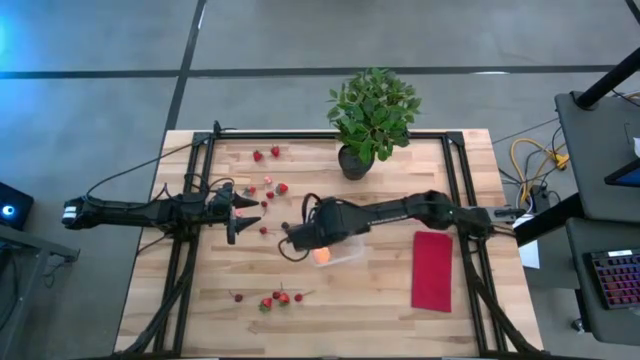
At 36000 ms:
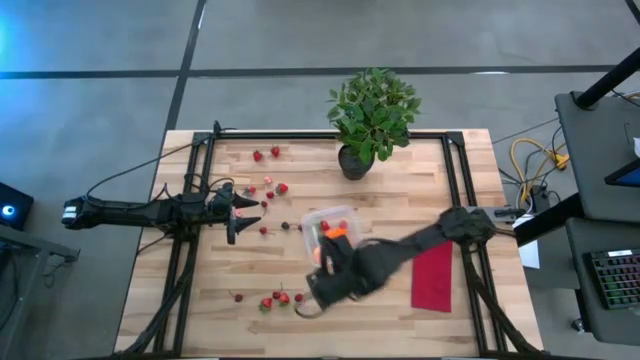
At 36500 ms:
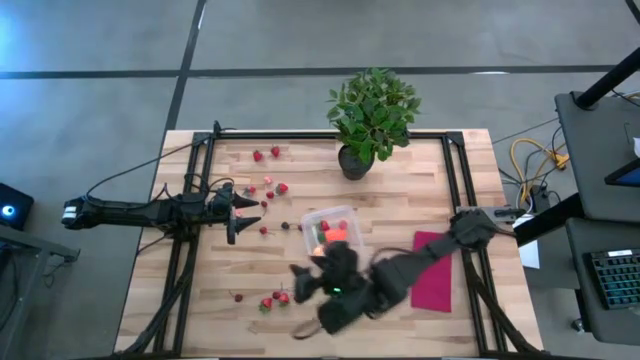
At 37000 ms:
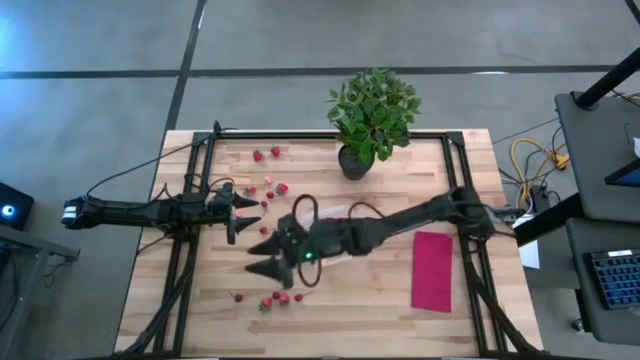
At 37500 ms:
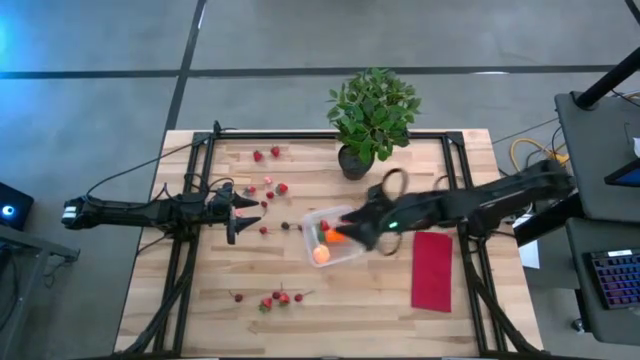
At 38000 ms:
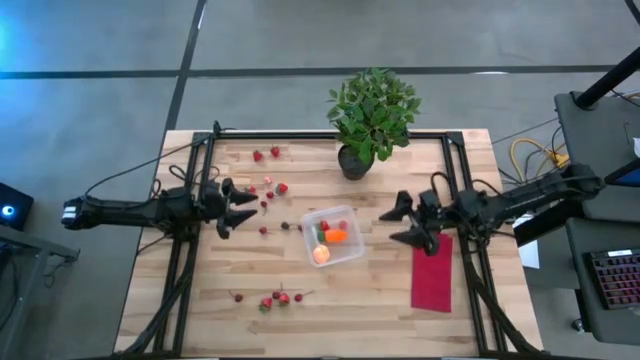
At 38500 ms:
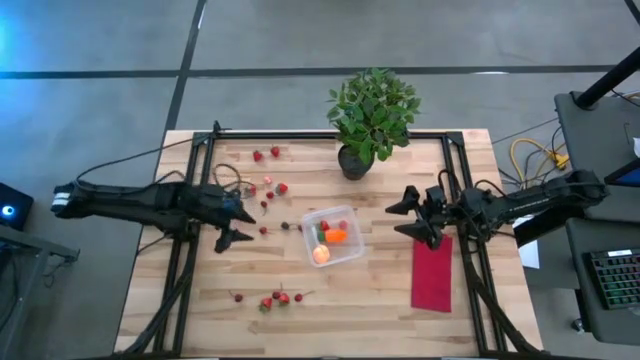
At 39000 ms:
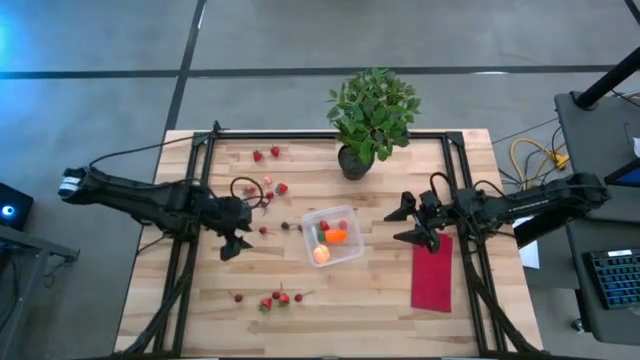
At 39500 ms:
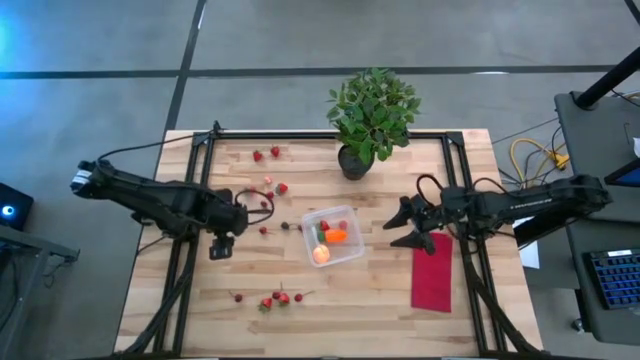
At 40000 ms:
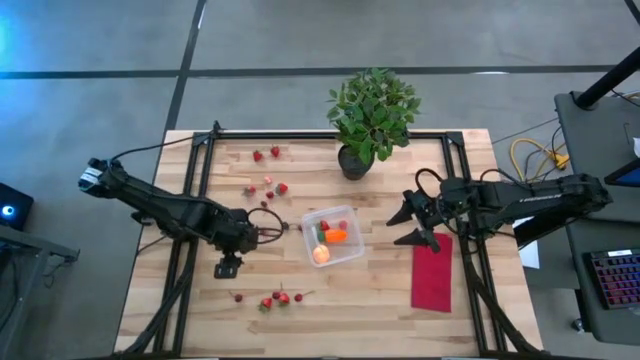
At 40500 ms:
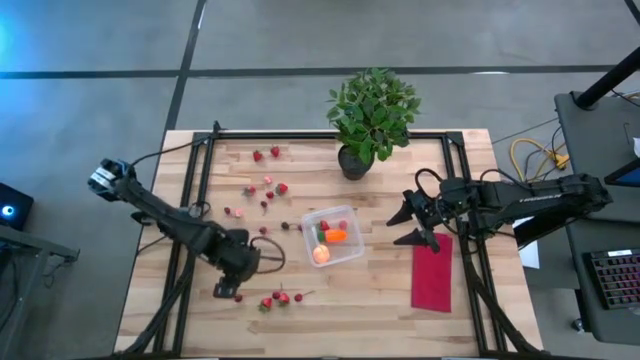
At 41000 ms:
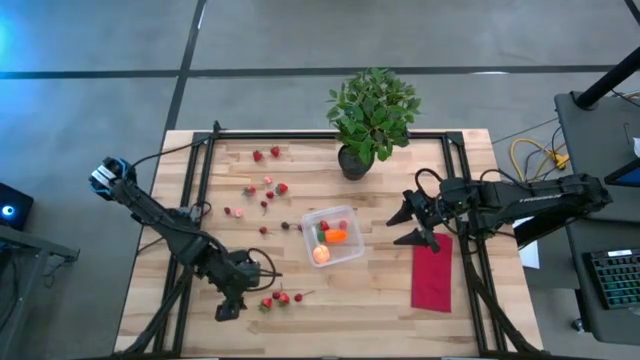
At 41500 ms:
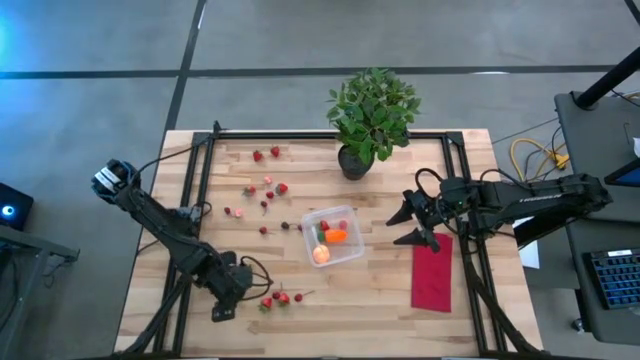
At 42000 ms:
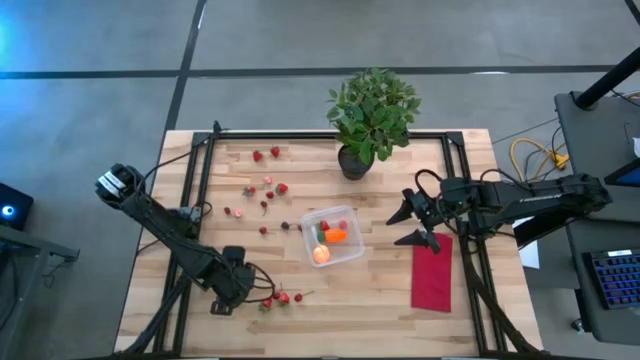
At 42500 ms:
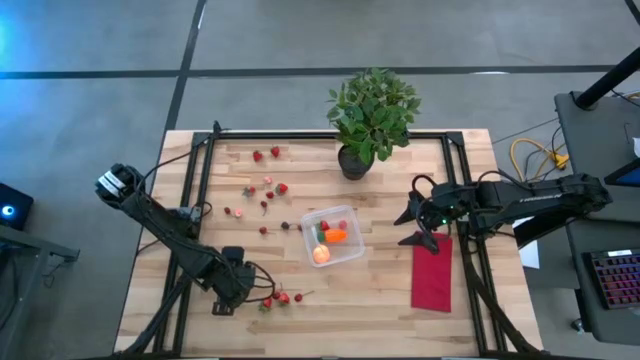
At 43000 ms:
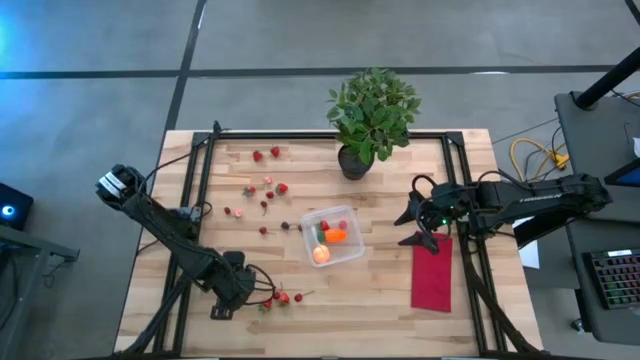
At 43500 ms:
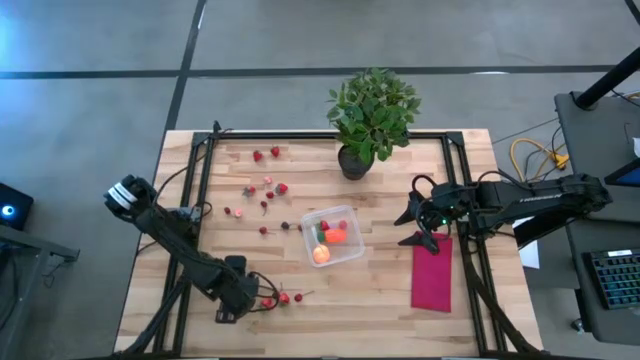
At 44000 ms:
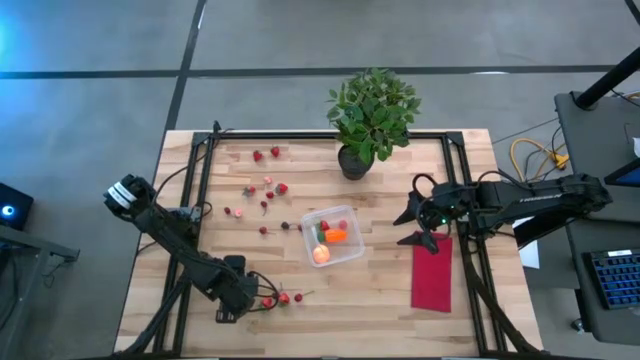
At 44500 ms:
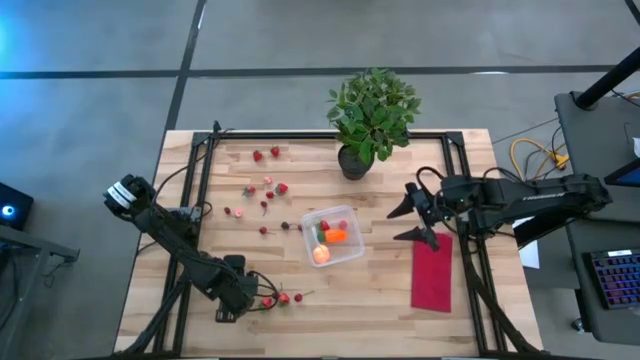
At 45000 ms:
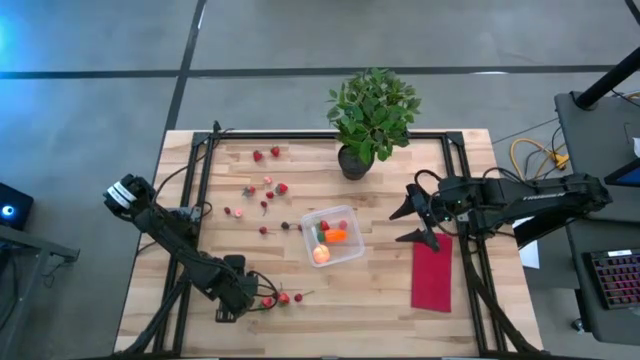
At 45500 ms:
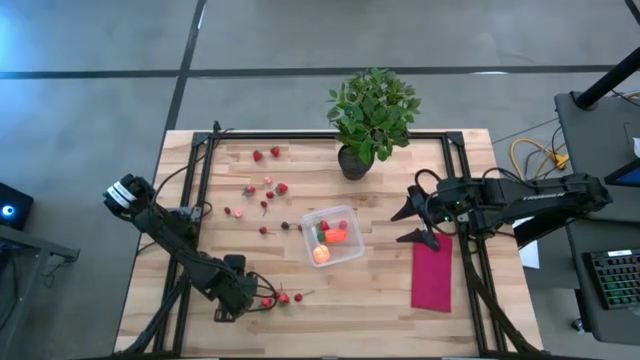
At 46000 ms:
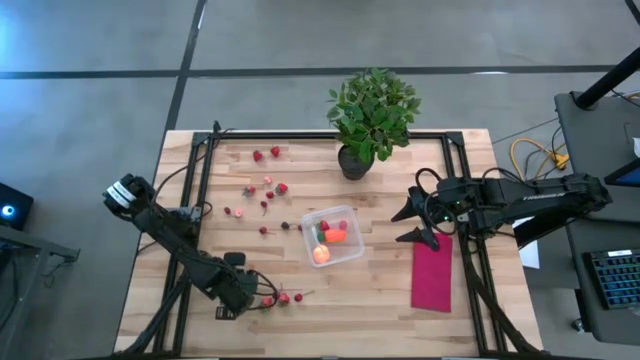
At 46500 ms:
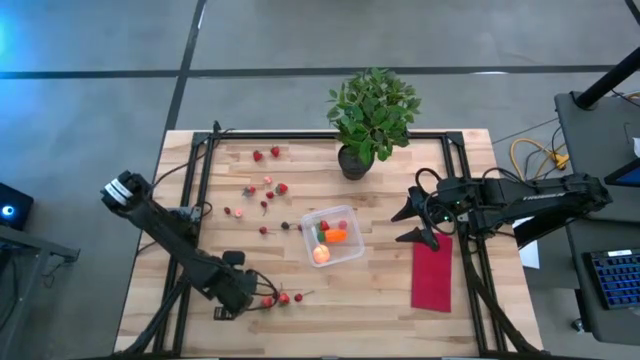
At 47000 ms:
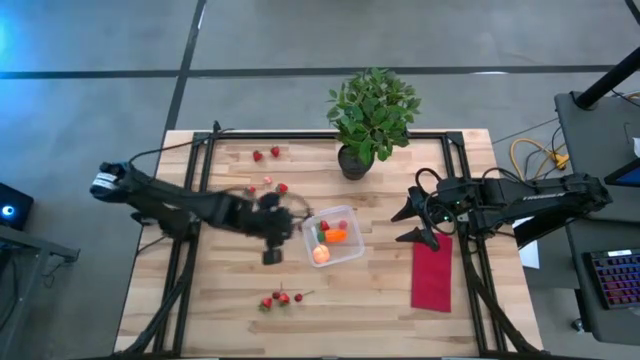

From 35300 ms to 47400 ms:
Task: Pick and placing Produce into tupperware
Put the red cherry into the transparent bin

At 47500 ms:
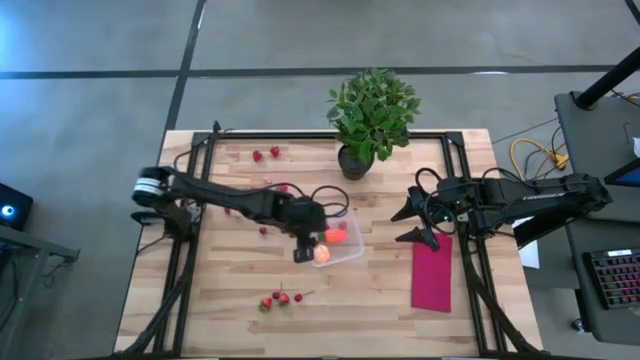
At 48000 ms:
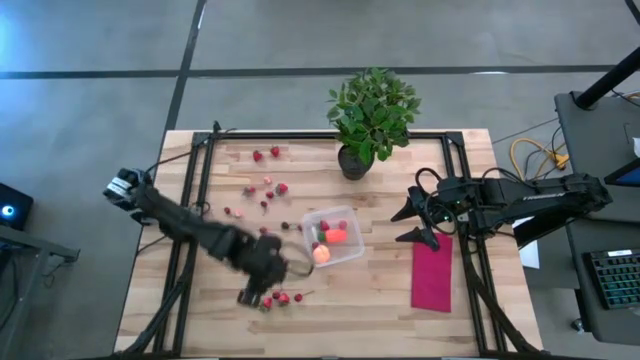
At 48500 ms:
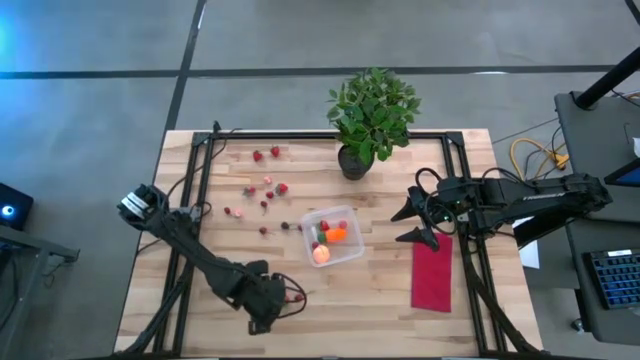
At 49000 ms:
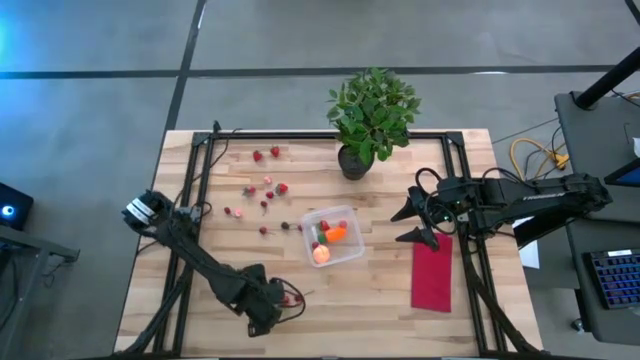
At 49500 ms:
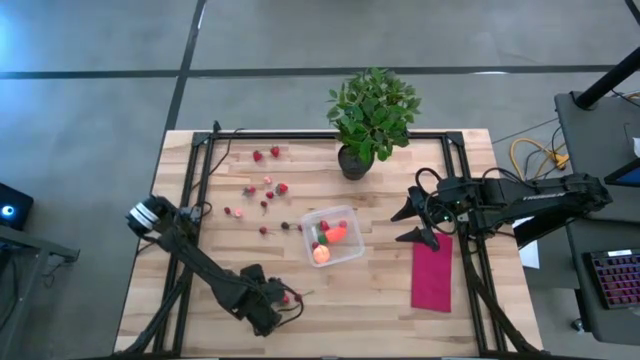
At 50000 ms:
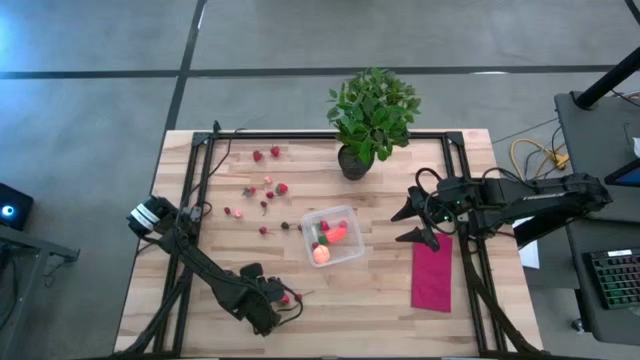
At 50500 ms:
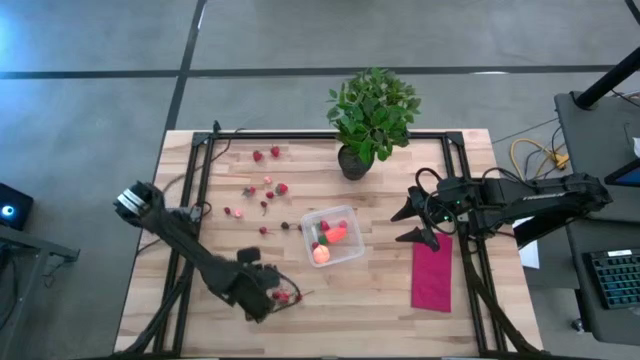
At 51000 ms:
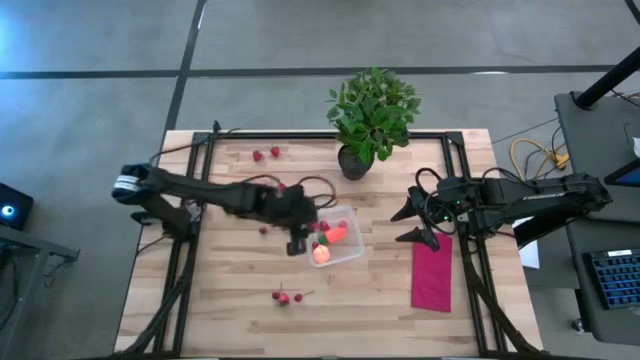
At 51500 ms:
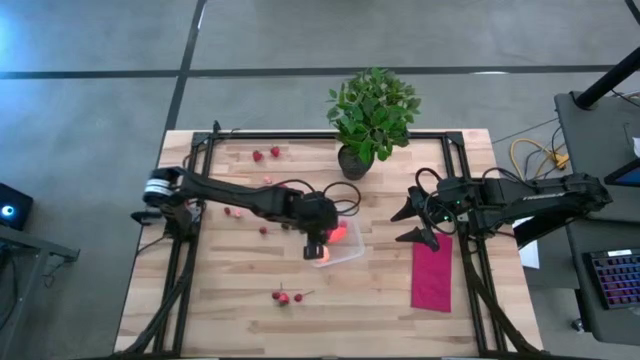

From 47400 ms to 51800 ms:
Put the red strawberry into the transparent bin

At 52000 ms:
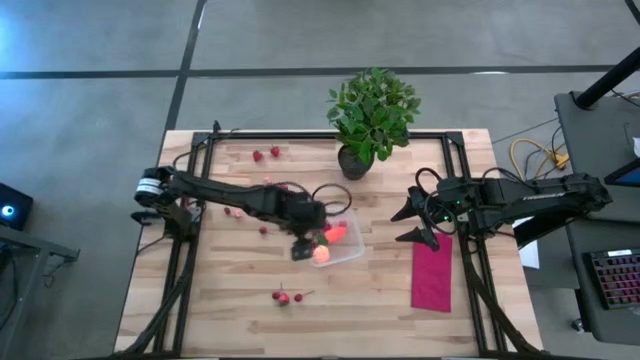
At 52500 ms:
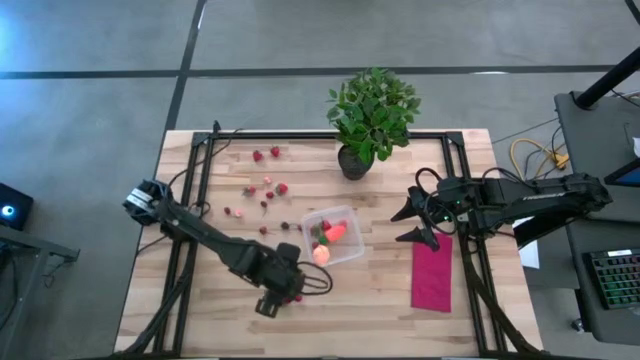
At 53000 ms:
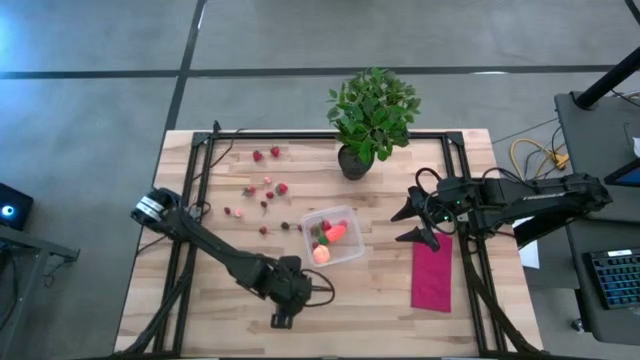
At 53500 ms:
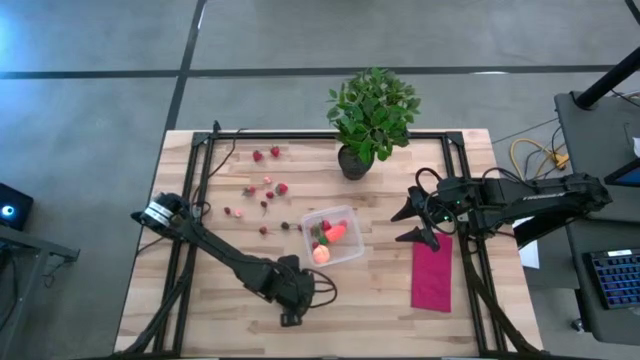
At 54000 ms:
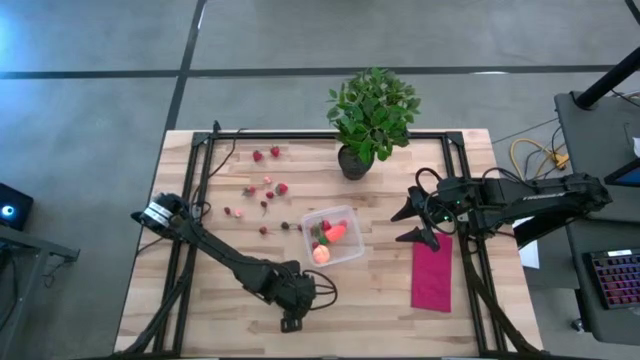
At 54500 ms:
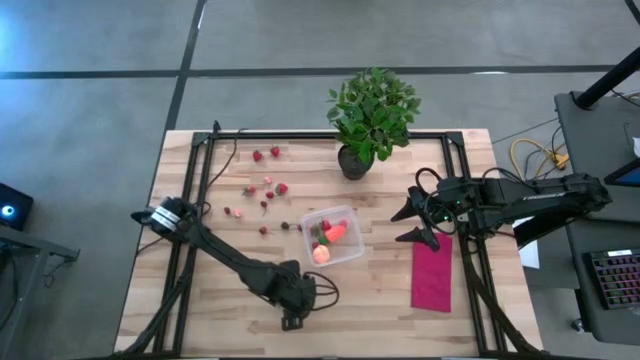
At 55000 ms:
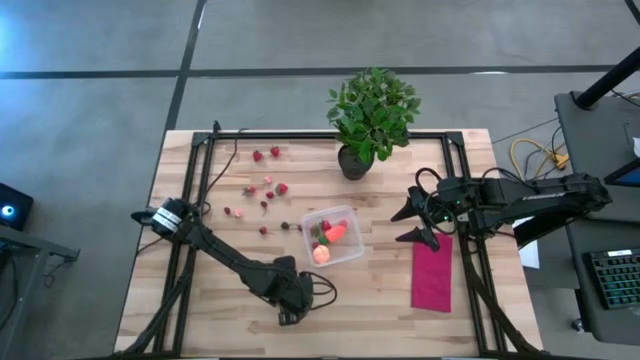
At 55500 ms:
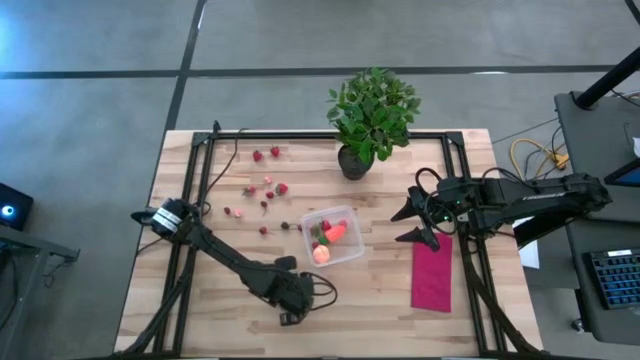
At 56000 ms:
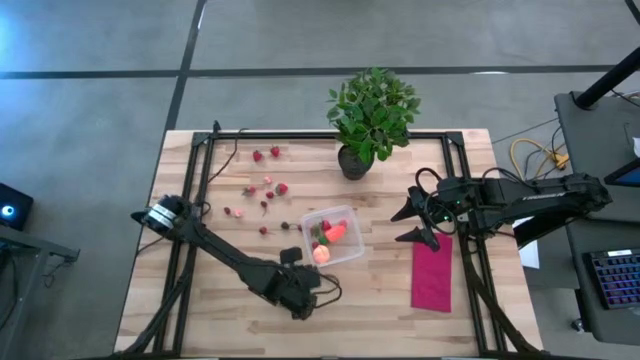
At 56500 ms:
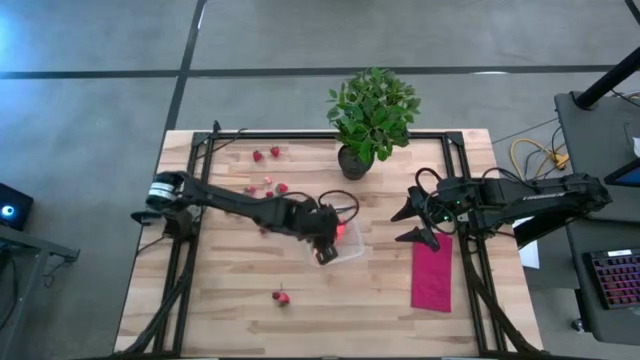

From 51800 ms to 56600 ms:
Put the red cherry into the transparent bin
